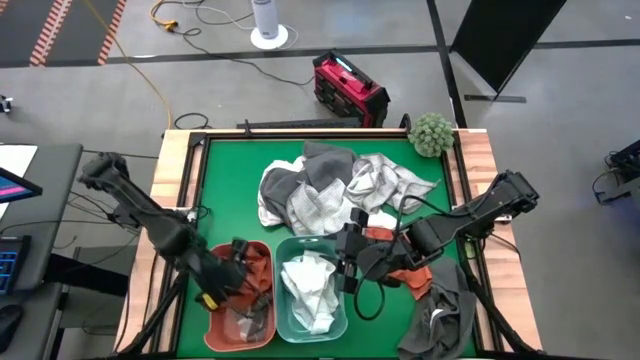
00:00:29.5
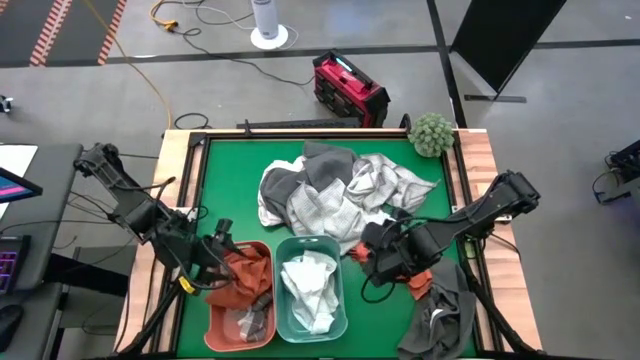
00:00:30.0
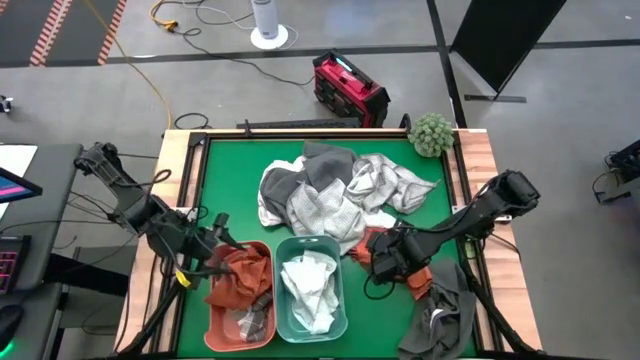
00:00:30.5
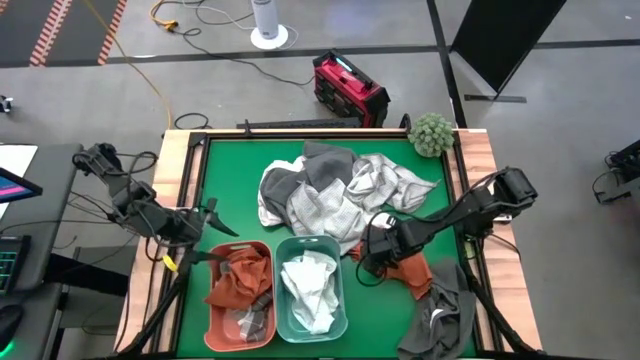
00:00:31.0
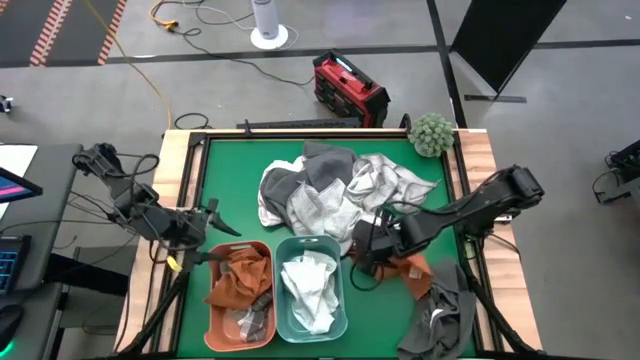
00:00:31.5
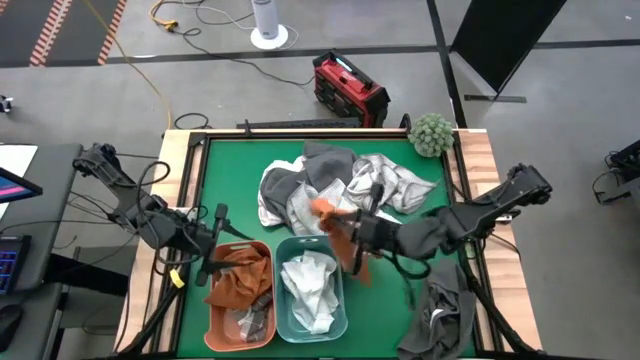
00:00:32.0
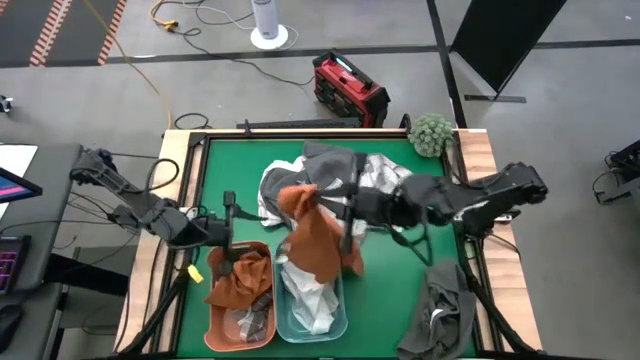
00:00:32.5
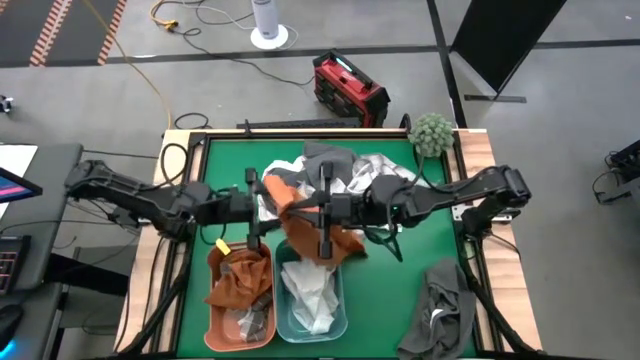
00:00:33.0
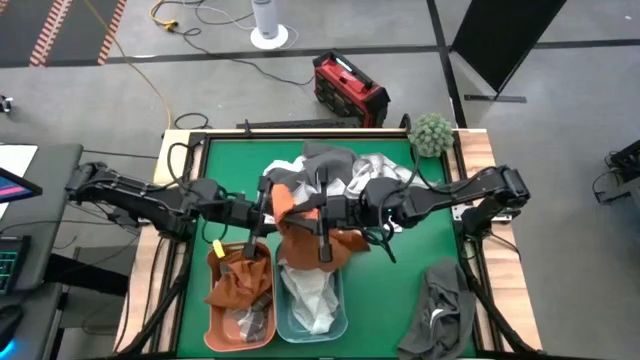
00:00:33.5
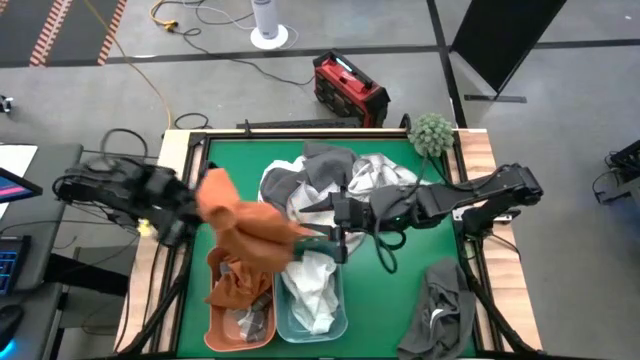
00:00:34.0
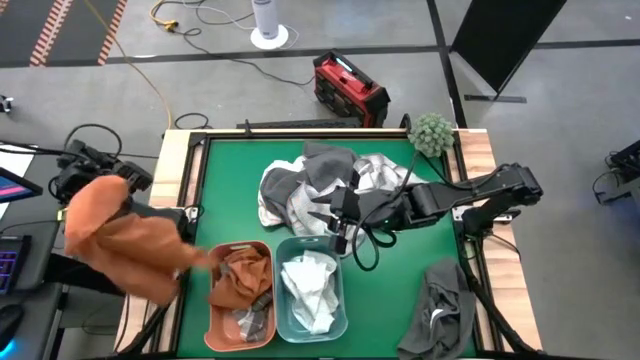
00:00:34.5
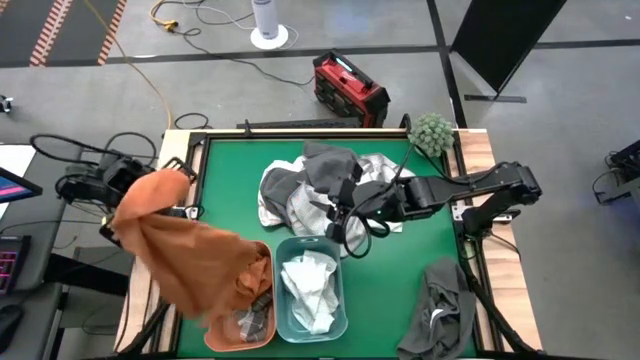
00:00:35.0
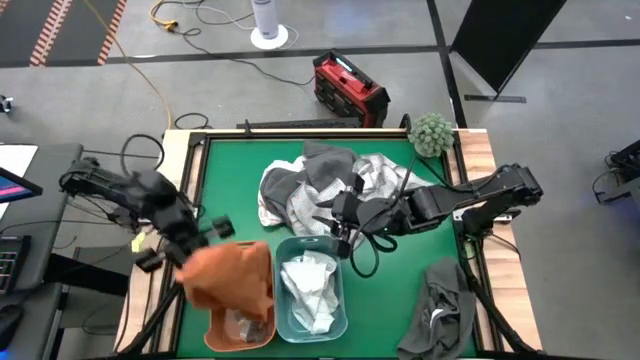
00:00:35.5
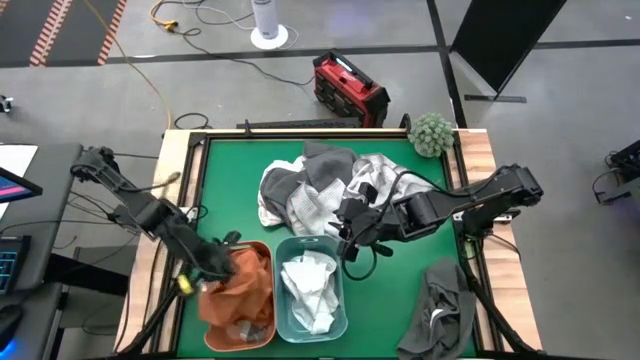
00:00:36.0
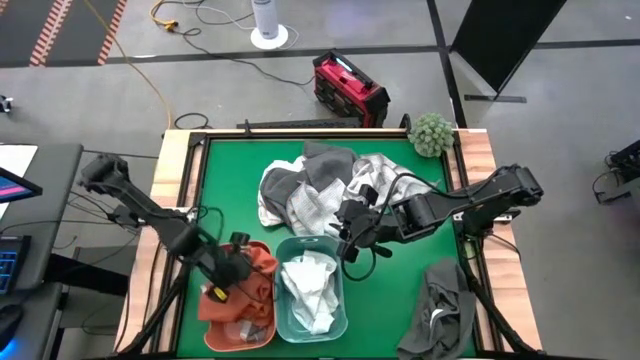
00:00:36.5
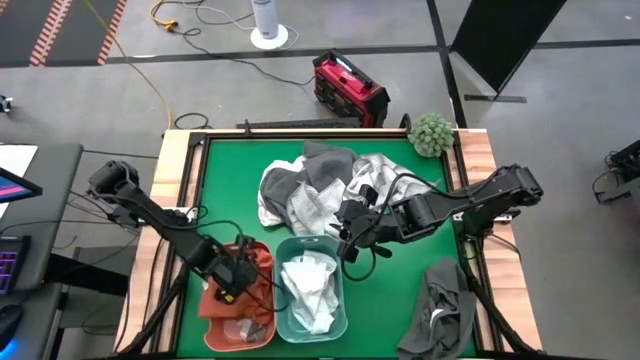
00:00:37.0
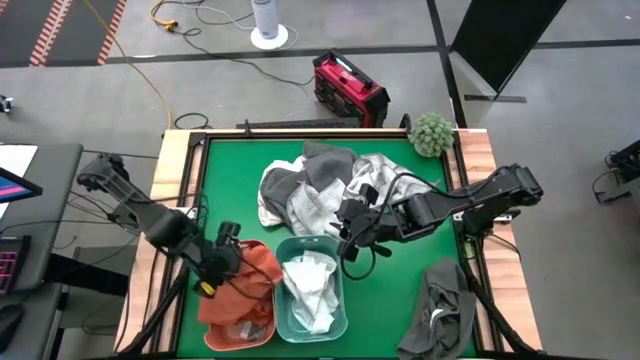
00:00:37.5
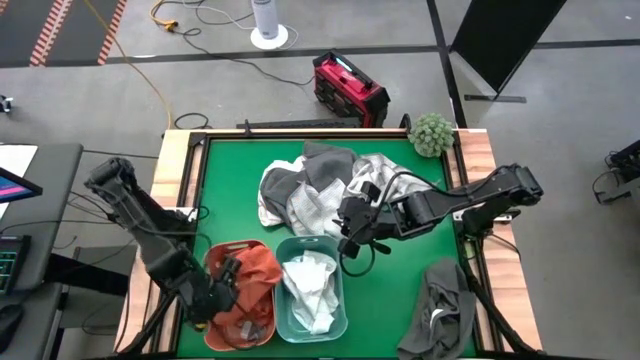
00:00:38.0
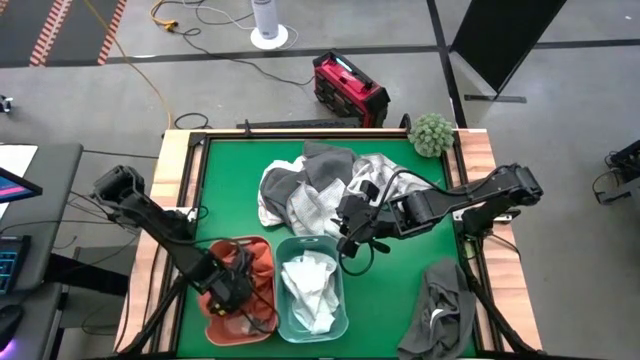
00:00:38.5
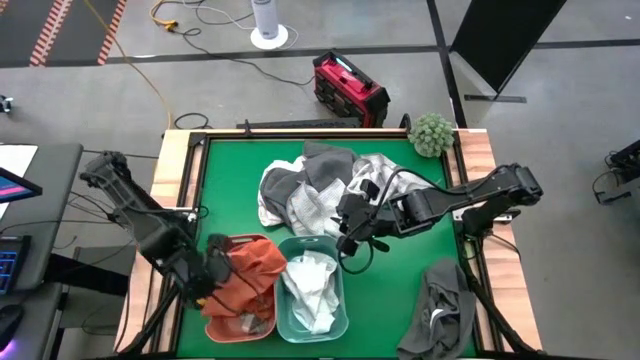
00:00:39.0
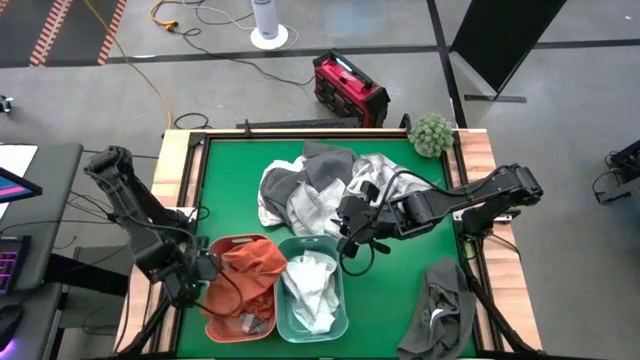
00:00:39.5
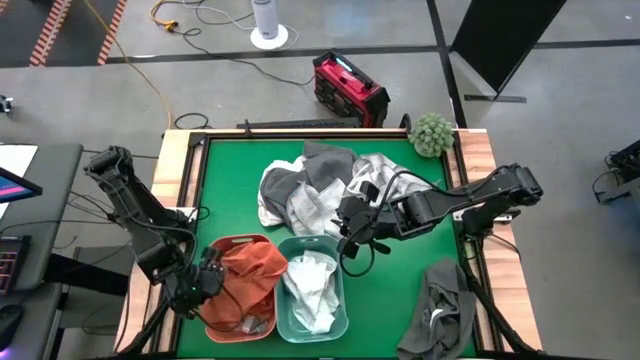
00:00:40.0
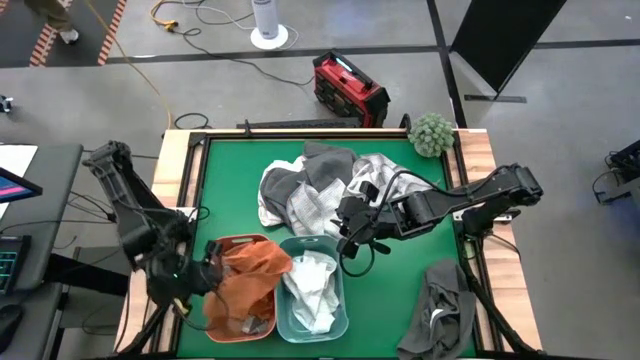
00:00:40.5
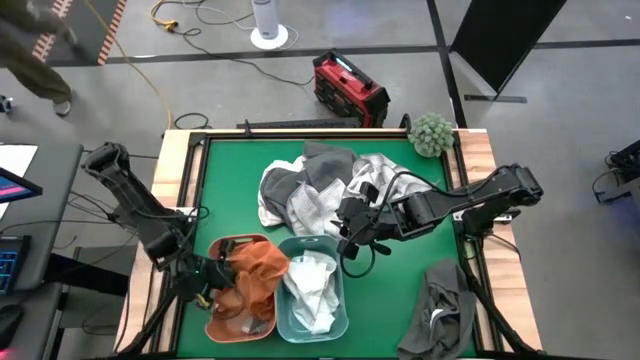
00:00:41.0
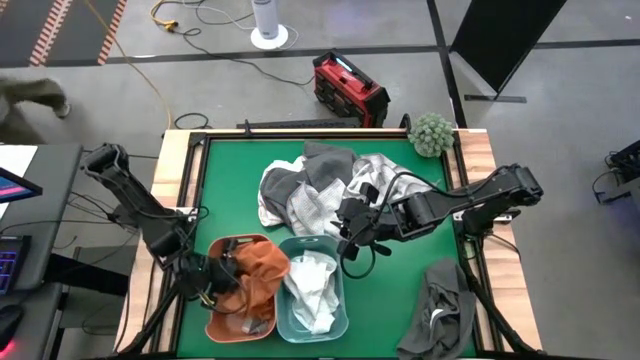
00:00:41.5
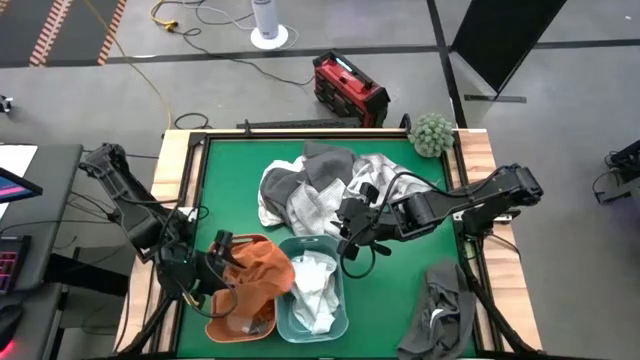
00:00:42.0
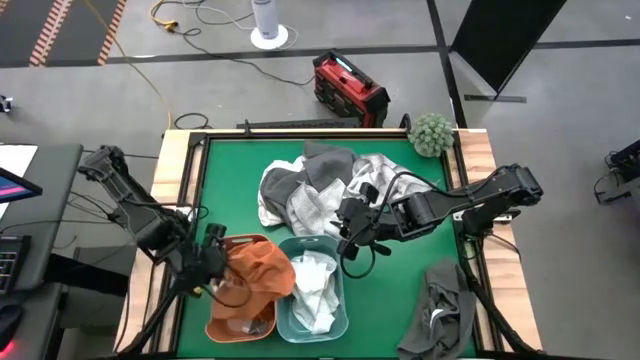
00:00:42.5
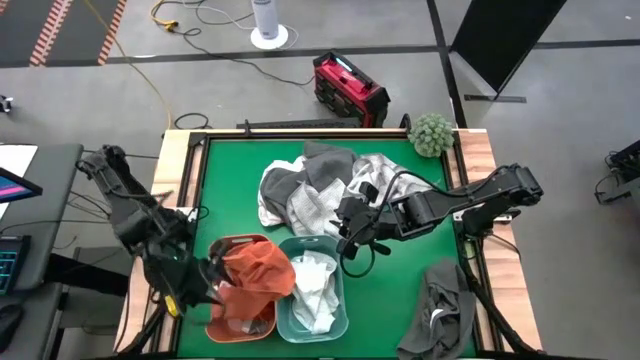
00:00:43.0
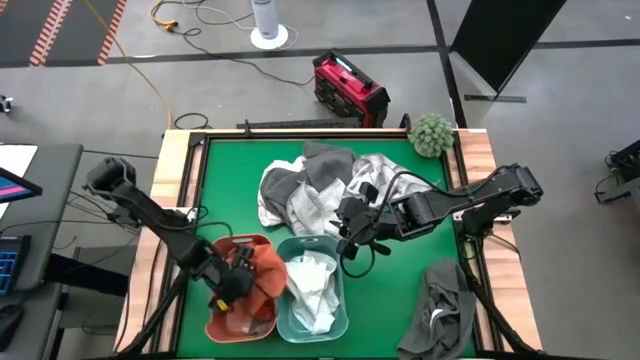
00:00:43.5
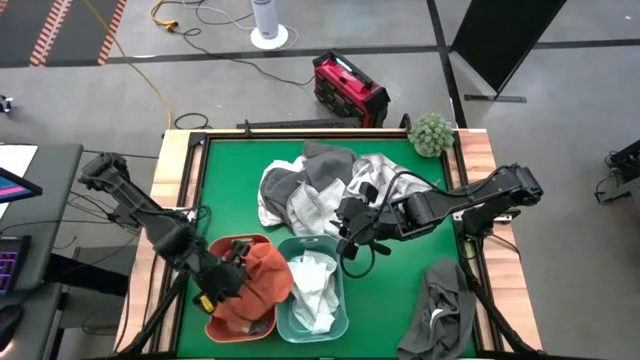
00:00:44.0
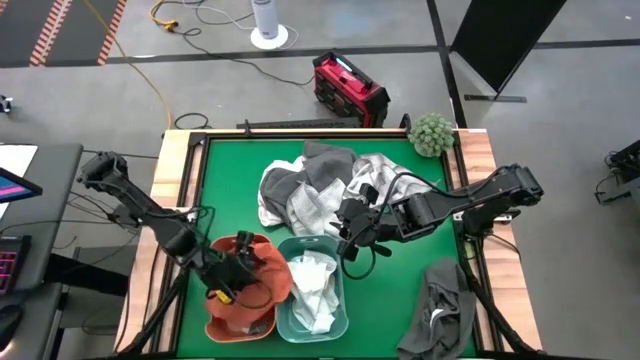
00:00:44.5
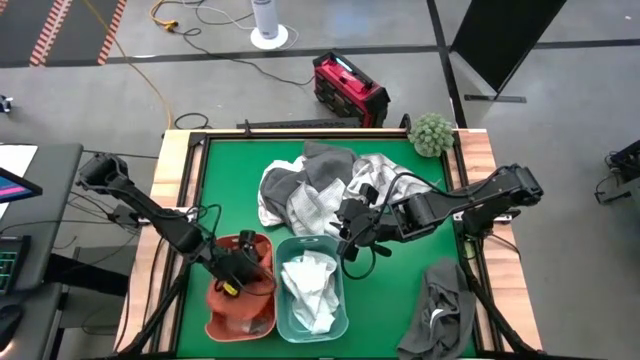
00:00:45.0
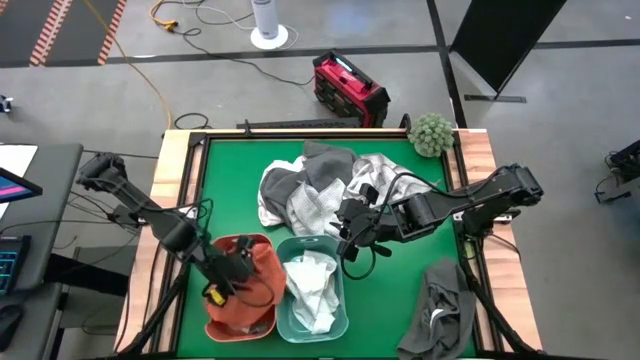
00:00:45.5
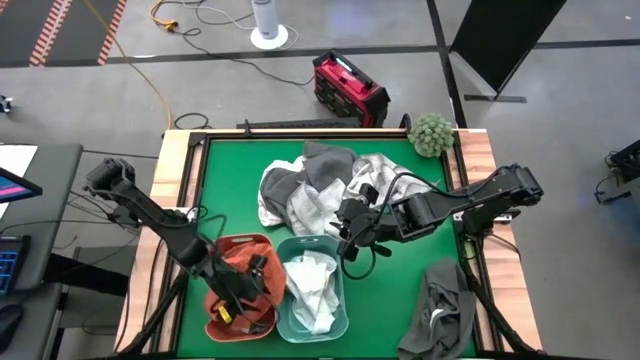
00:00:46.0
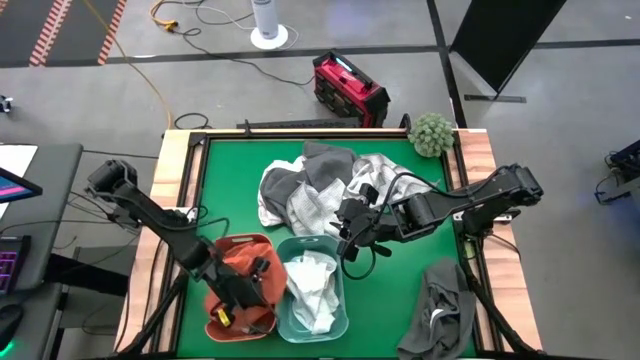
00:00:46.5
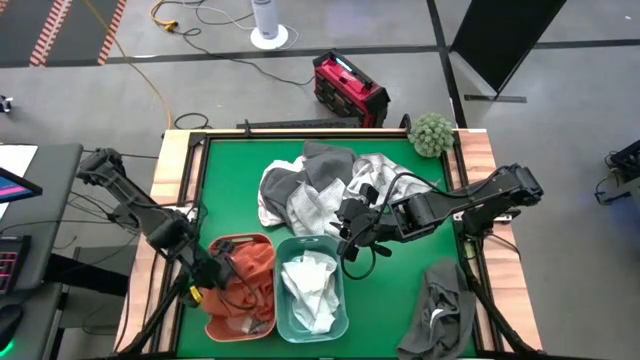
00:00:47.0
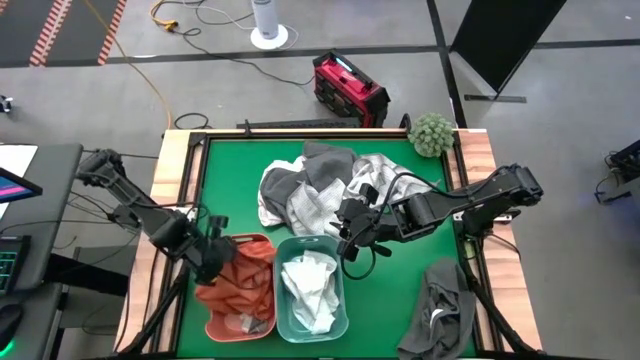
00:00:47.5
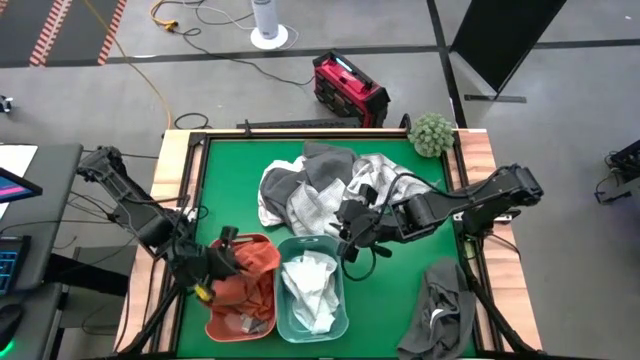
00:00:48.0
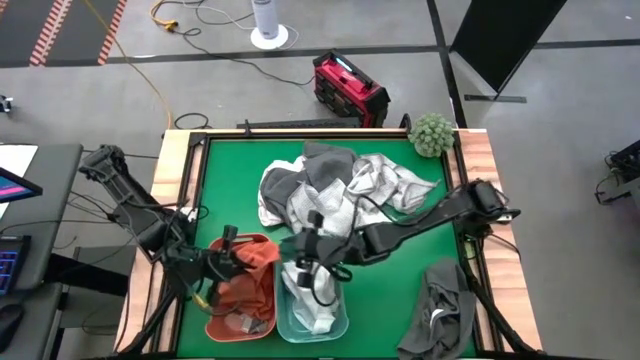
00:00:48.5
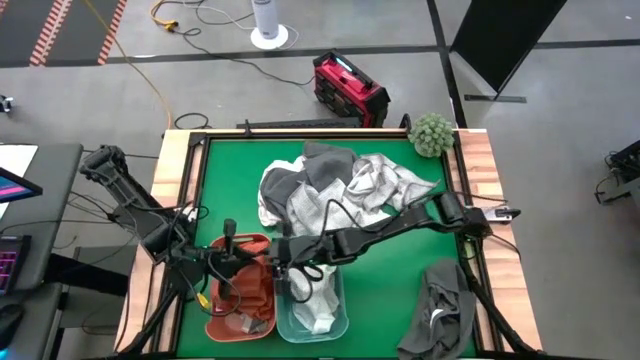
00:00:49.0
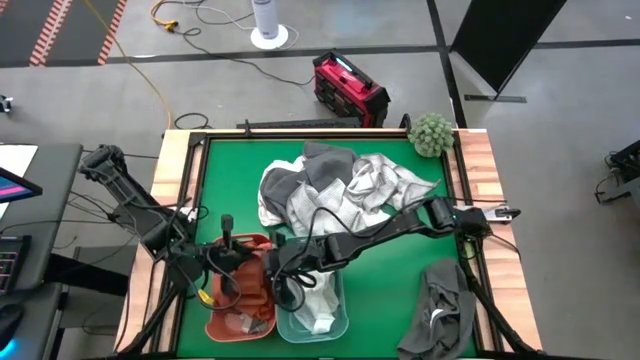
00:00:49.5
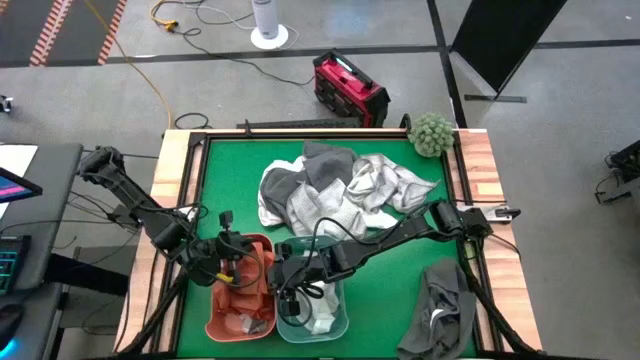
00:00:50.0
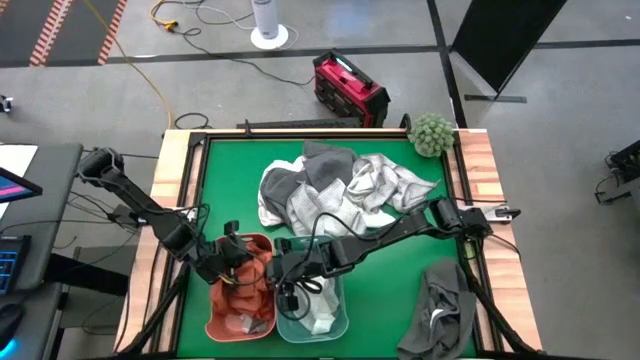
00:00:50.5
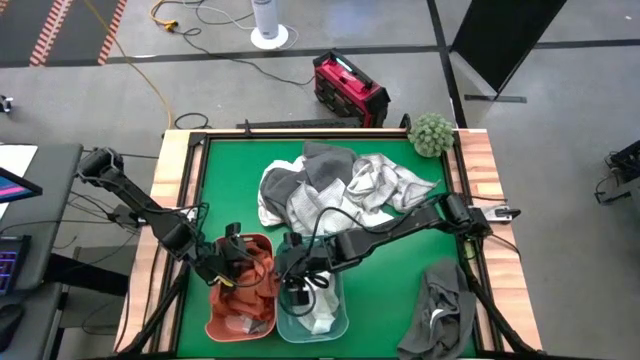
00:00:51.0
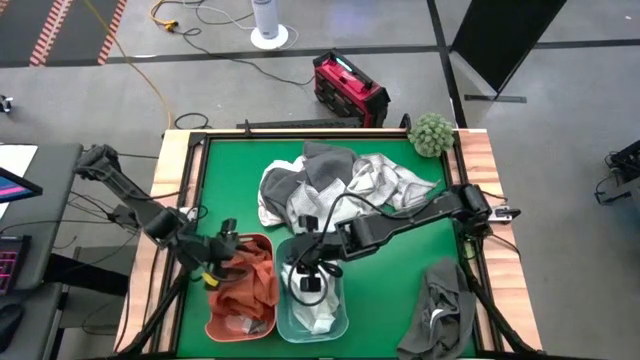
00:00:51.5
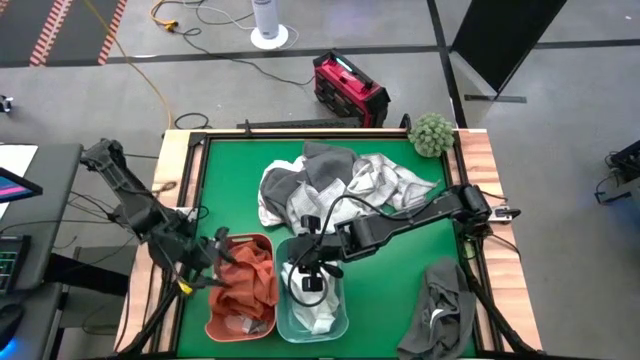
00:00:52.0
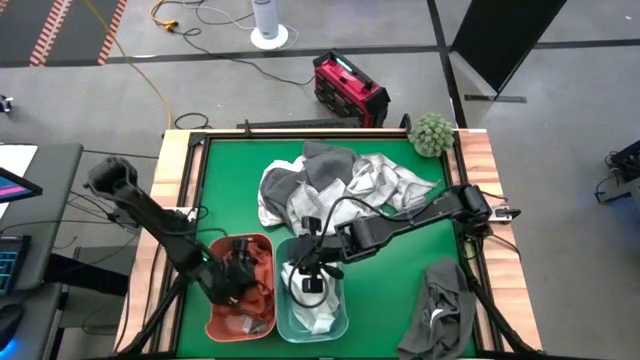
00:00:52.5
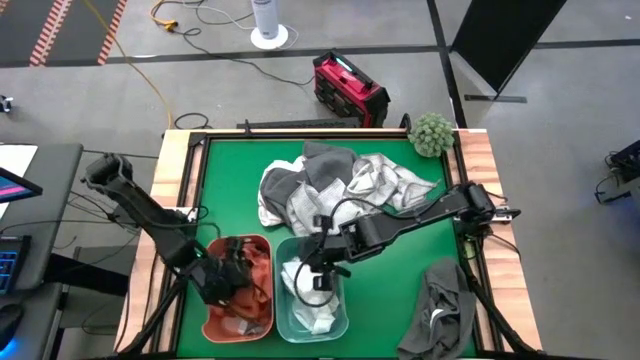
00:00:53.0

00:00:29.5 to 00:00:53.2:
Task: Sort towels by color in basket
Put the orange towel into the orange bin
